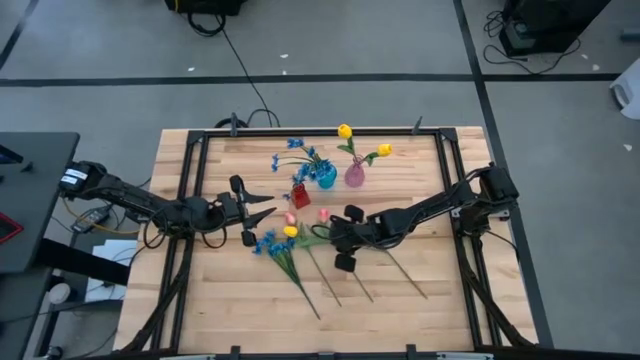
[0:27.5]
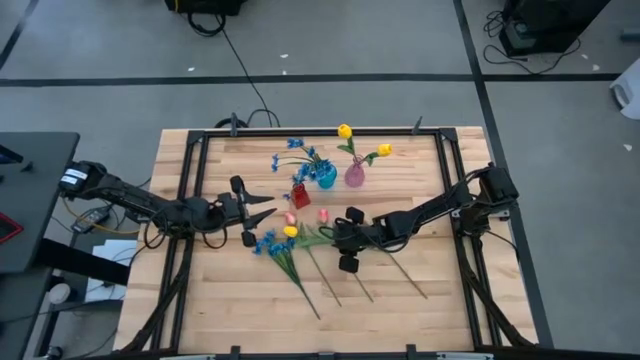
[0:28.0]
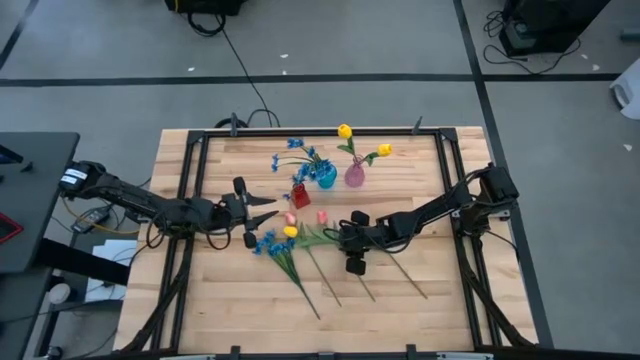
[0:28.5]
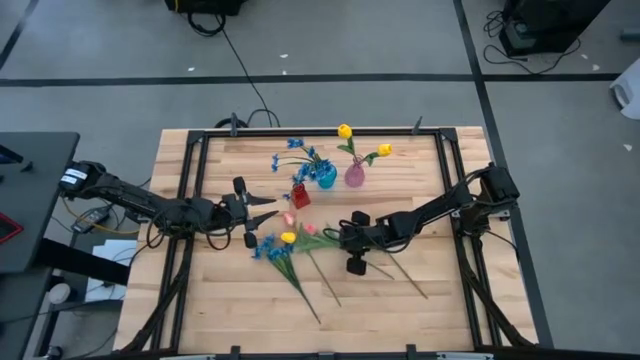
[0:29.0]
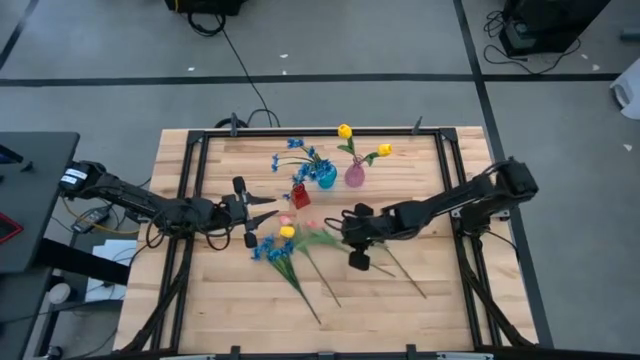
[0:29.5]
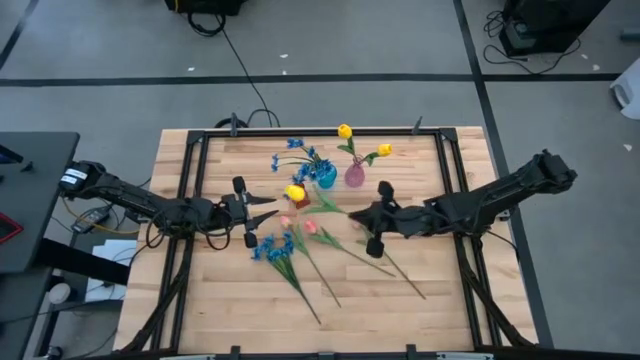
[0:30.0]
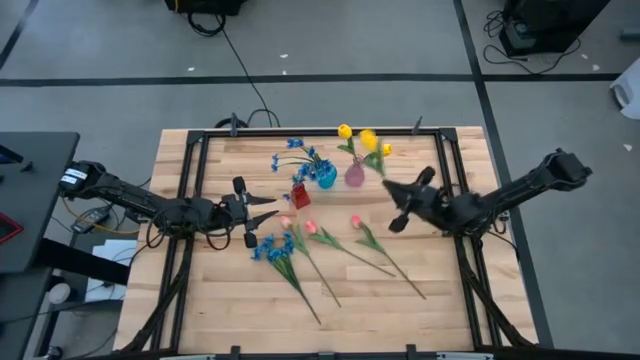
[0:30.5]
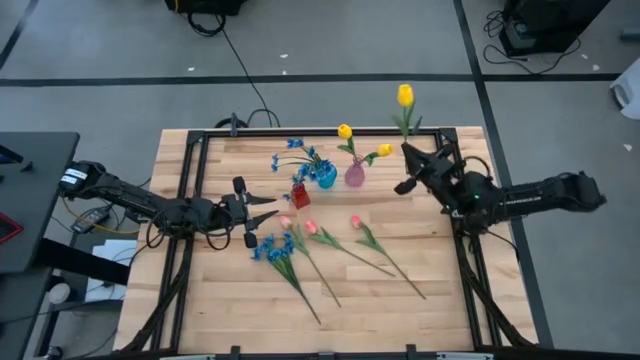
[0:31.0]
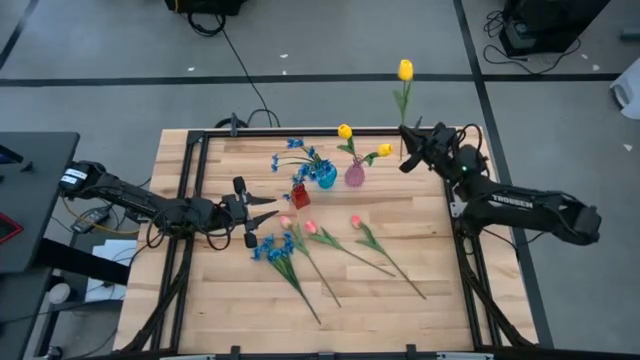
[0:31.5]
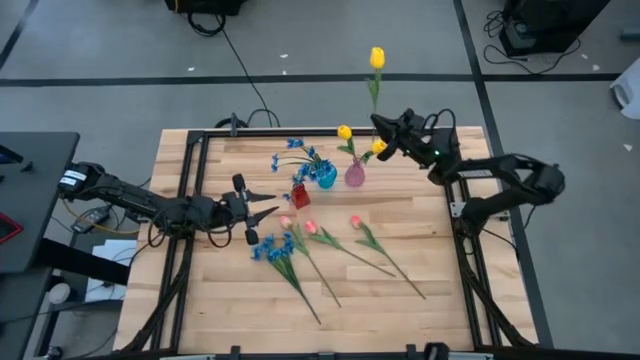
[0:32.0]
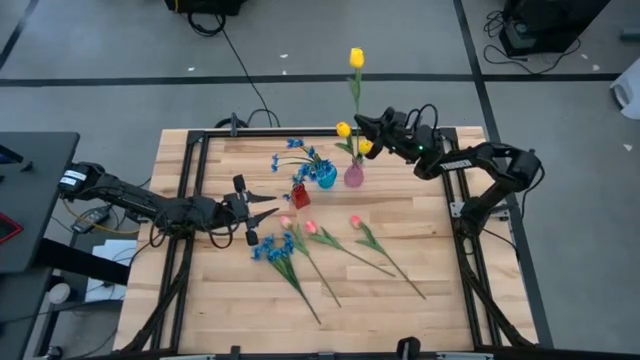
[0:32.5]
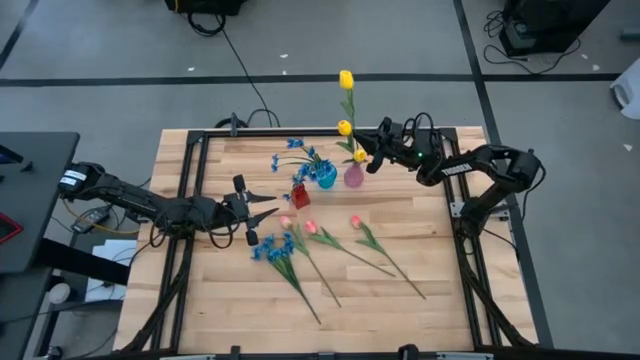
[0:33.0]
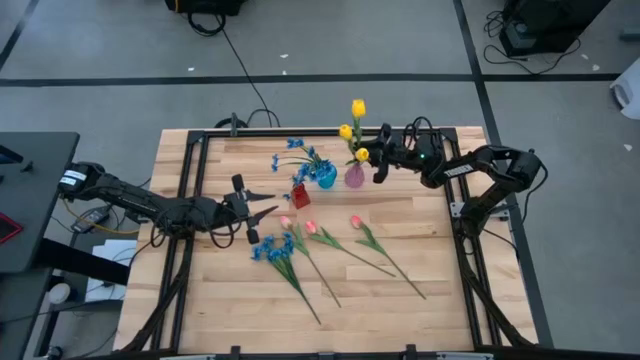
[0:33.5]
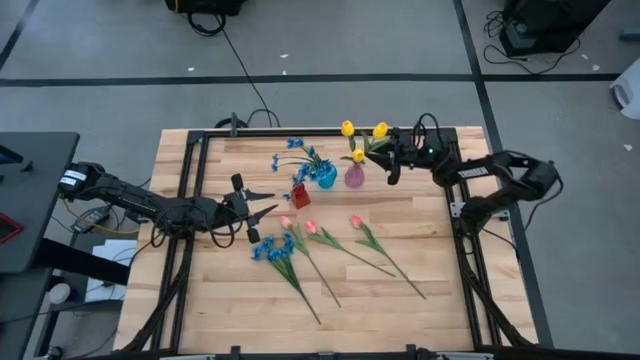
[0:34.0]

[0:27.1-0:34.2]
Task: Sort flowers into vase by color
Put the yellow flower into the purple vase

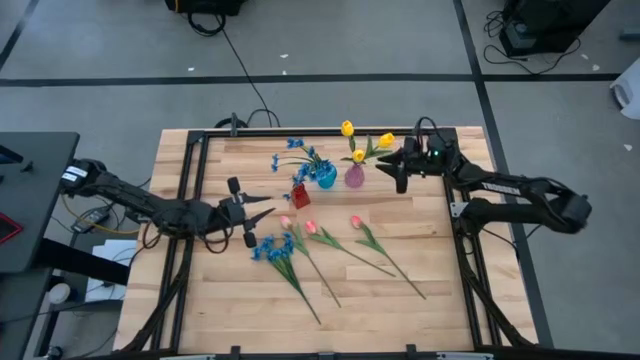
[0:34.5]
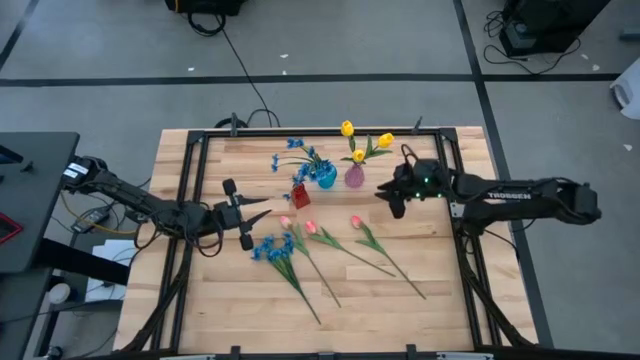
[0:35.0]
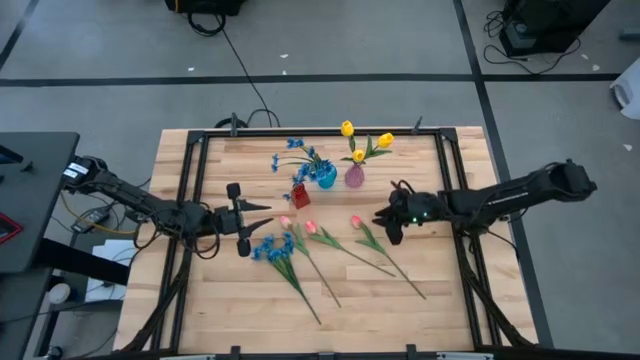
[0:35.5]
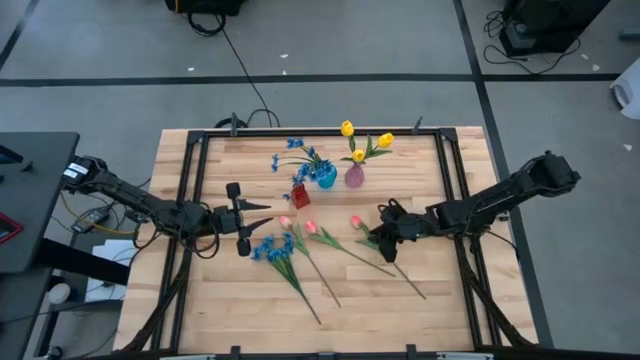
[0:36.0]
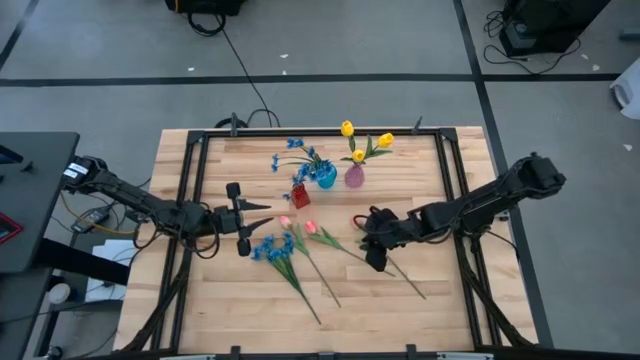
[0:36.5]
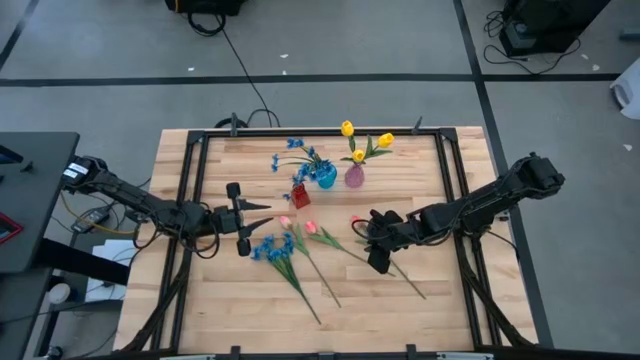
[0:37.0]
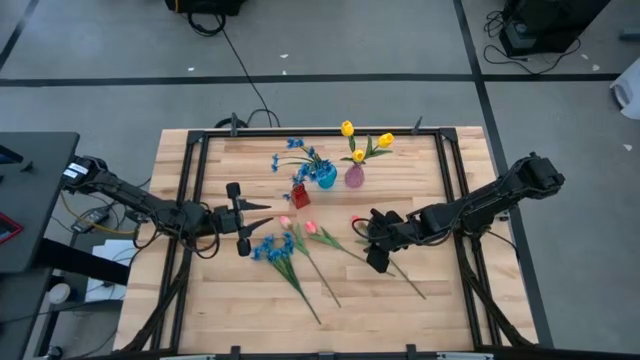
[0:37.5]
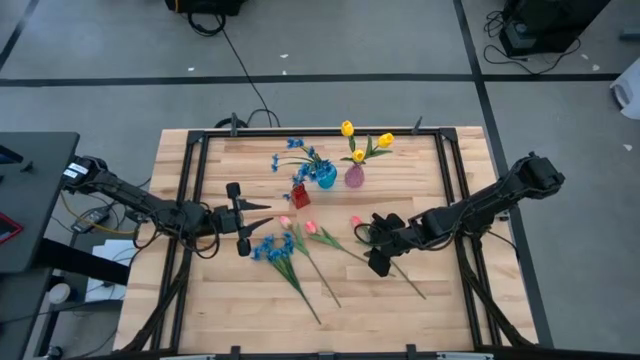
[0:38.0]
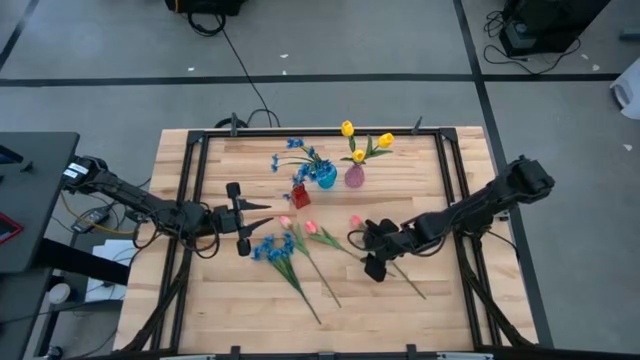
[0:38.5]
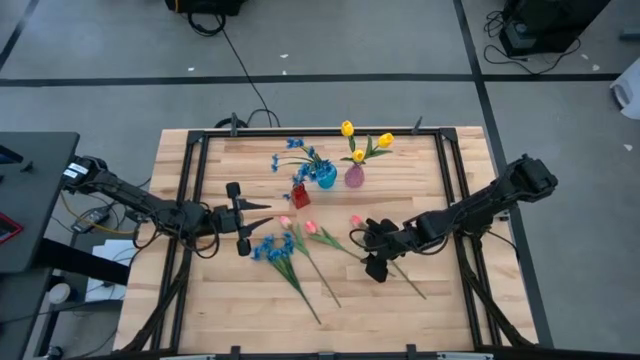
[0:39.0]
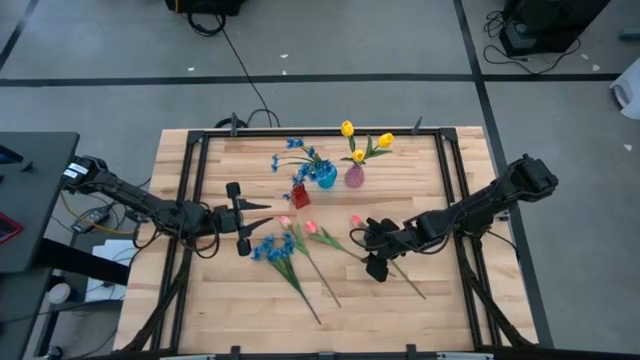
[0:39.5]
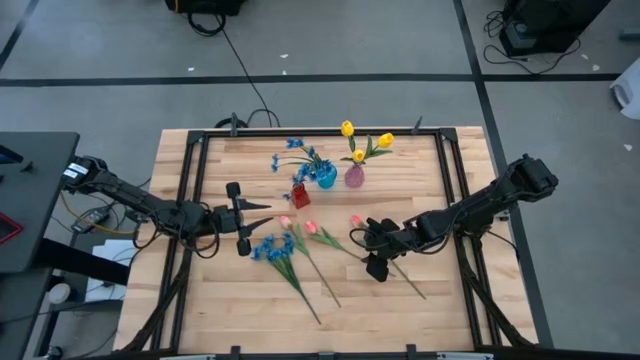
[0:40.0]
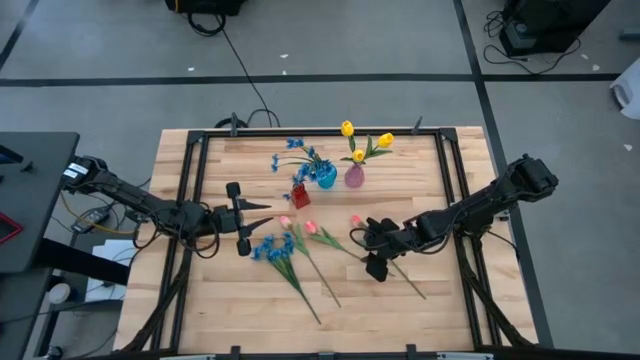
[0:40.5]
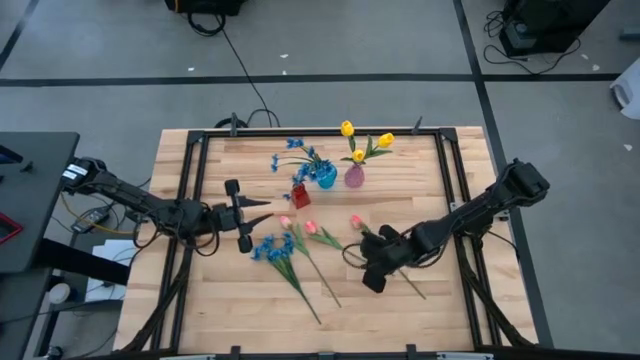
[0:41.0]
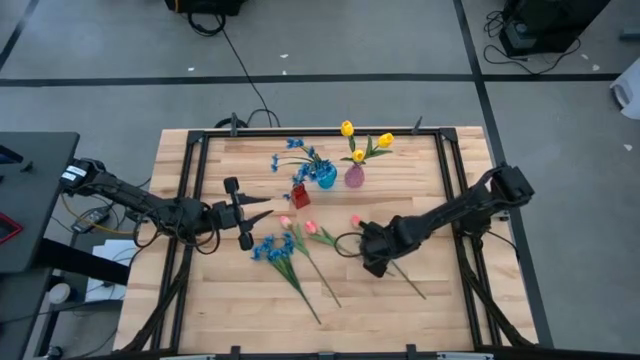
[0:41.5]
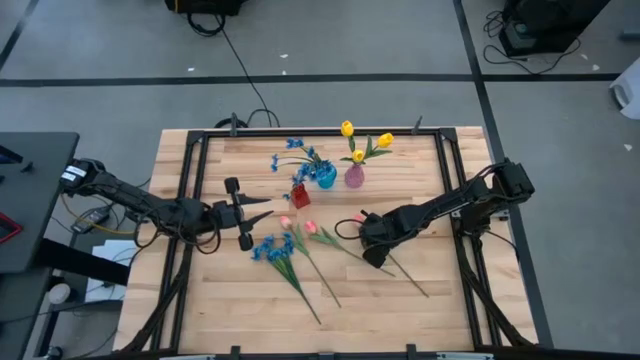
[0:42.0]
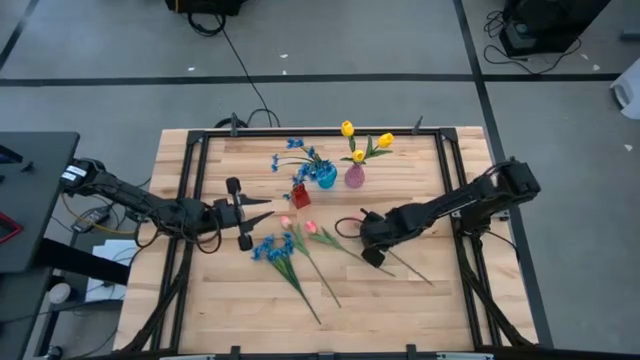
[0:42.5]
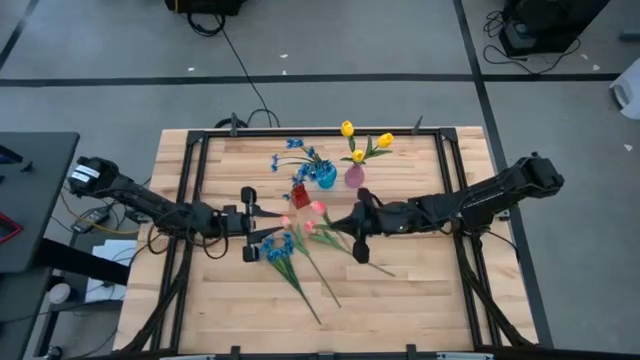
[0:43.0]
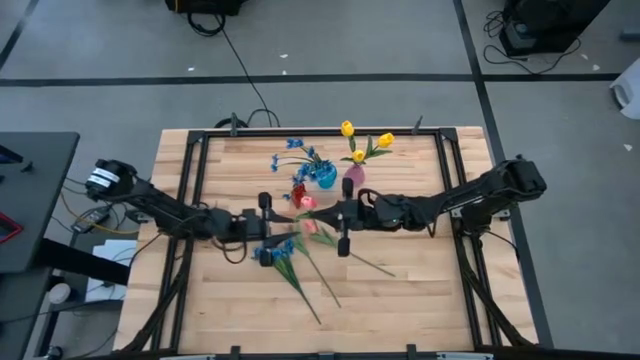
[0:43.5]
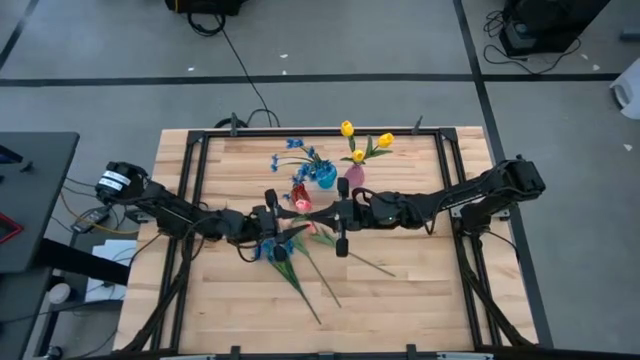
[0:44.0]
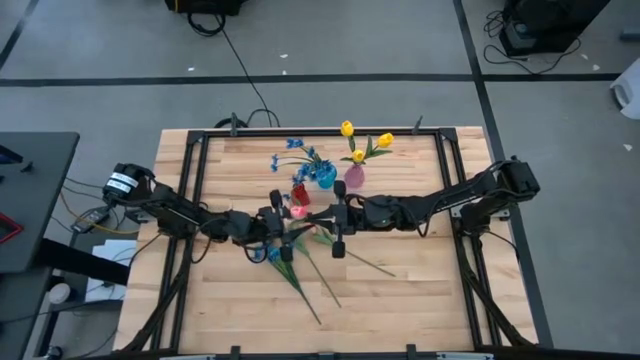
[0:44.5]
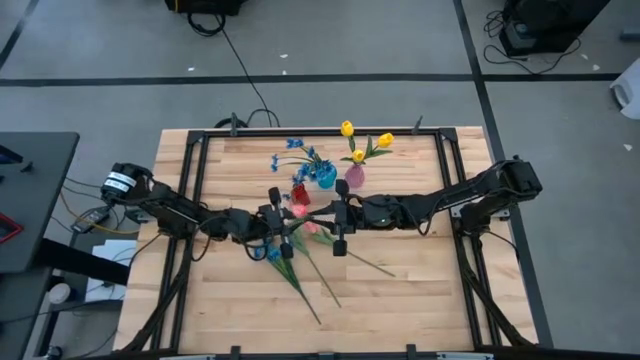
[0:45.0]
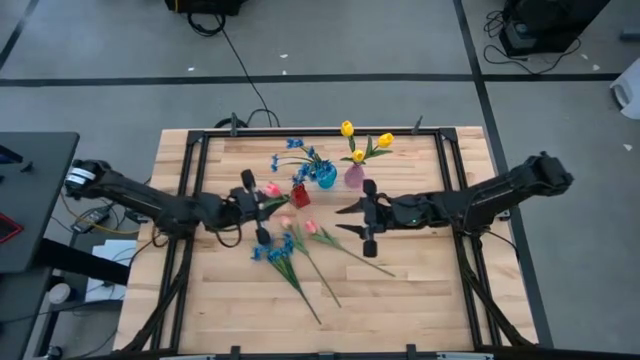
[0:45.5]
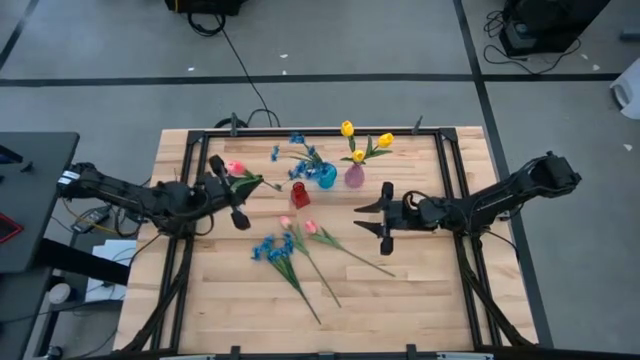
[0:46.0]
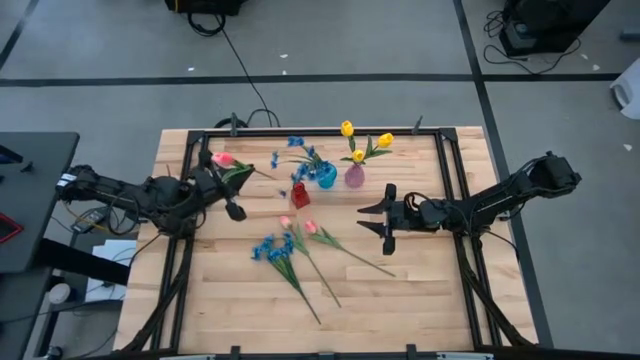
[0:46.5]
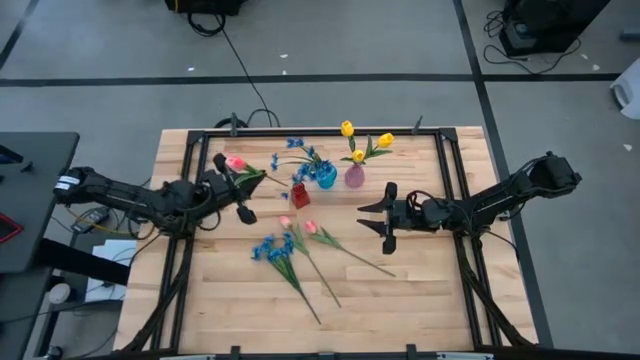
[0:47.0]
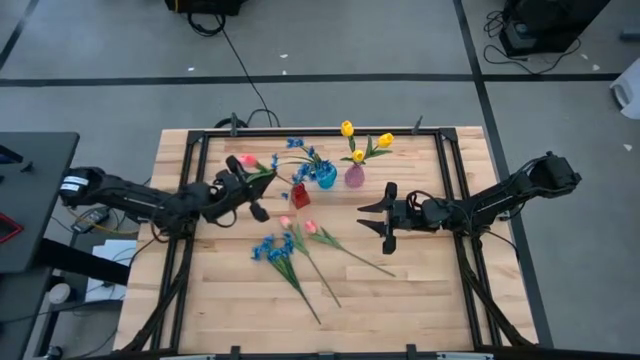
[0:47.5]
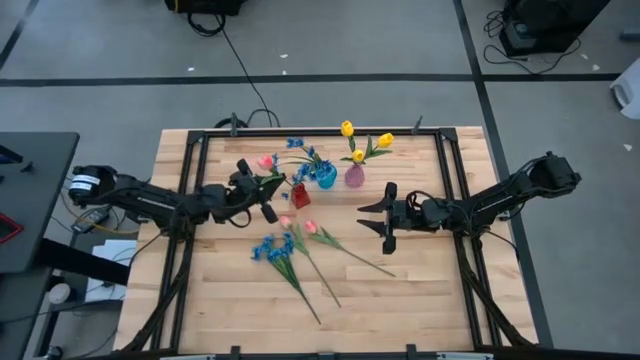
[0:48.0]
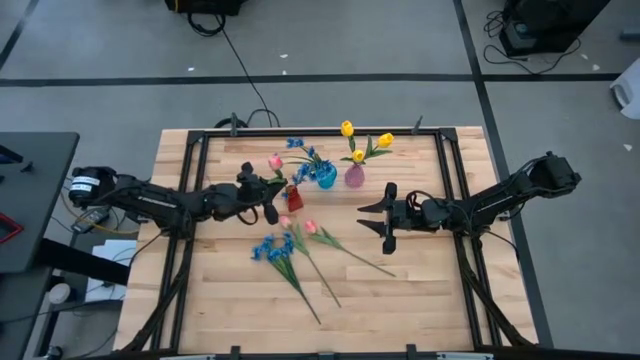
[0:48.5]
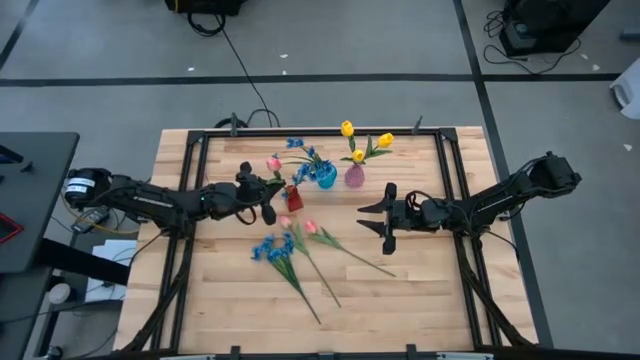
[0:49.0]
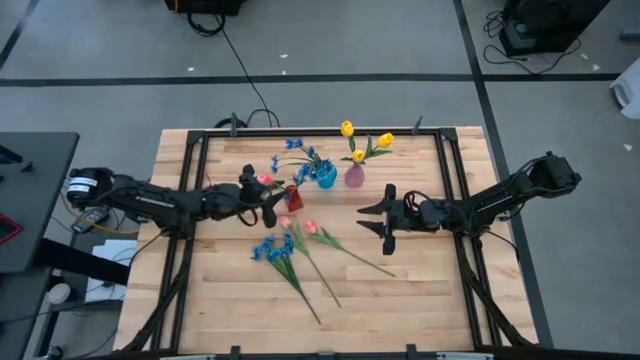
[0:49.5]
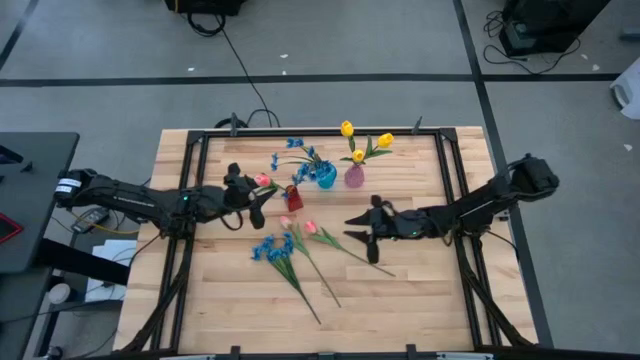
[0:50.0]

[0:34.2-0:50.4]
Put the pink flower into the red vase
